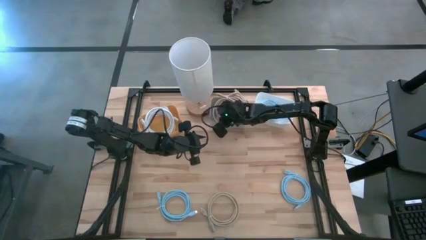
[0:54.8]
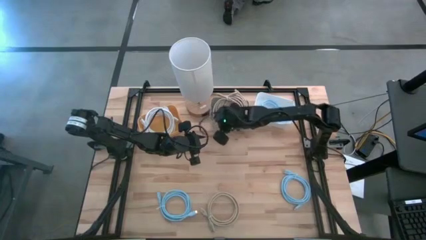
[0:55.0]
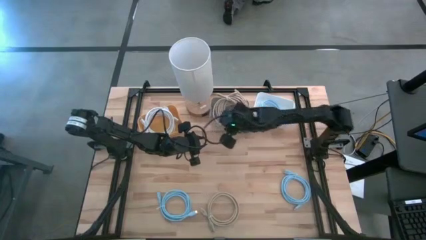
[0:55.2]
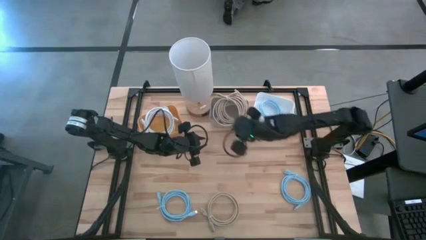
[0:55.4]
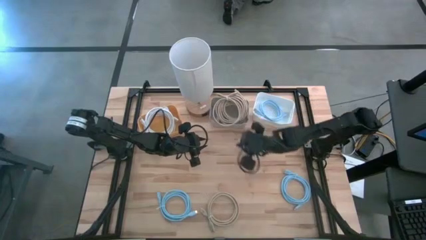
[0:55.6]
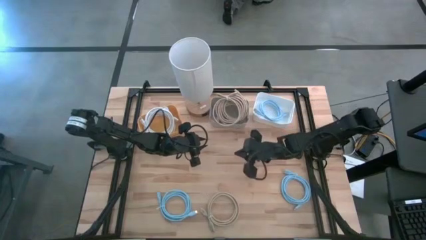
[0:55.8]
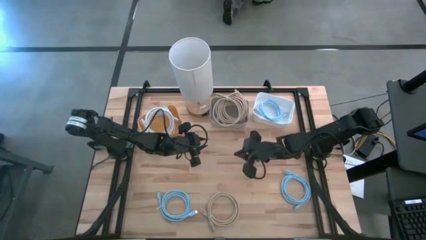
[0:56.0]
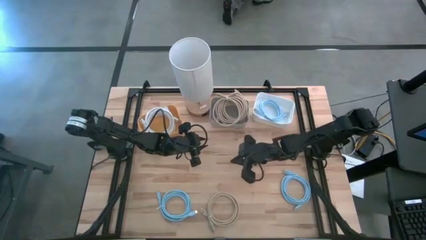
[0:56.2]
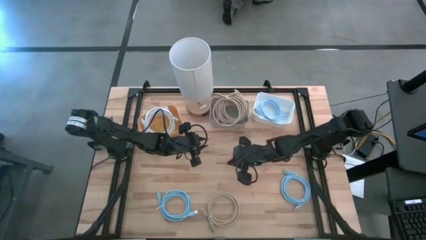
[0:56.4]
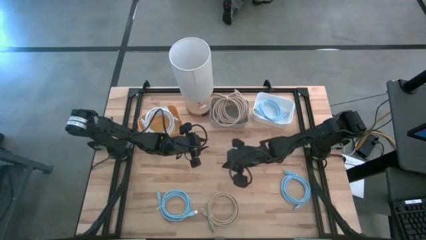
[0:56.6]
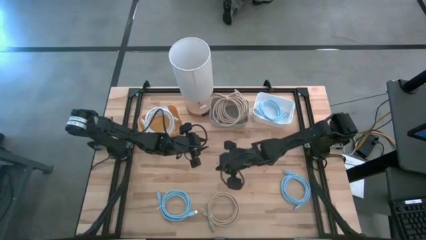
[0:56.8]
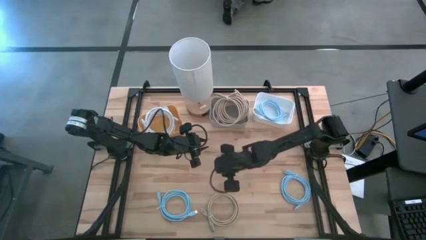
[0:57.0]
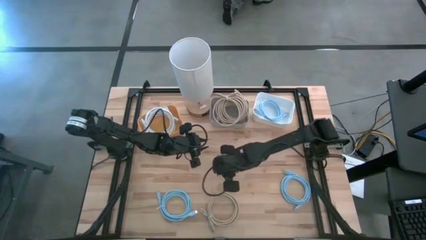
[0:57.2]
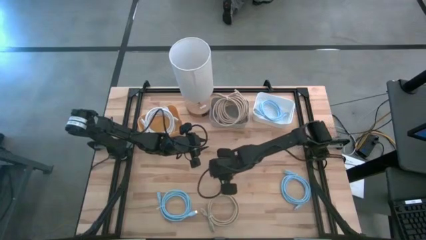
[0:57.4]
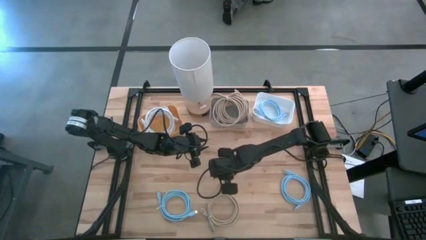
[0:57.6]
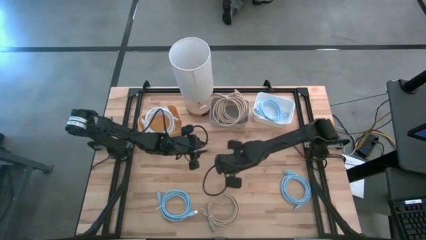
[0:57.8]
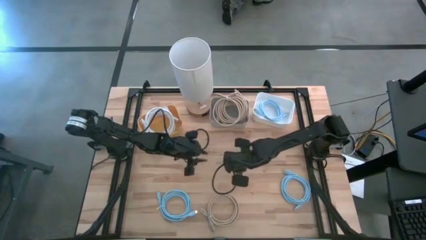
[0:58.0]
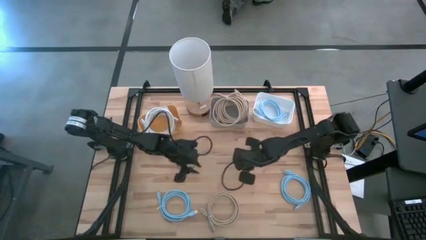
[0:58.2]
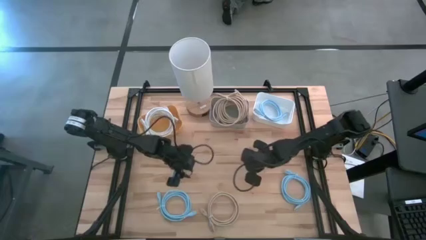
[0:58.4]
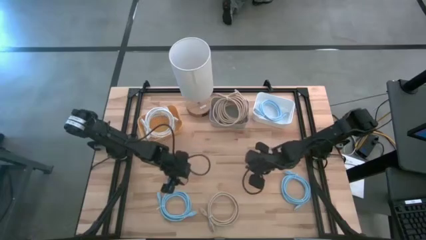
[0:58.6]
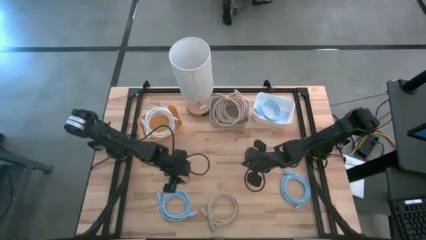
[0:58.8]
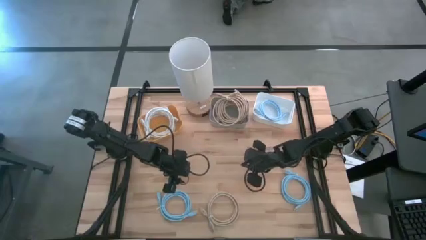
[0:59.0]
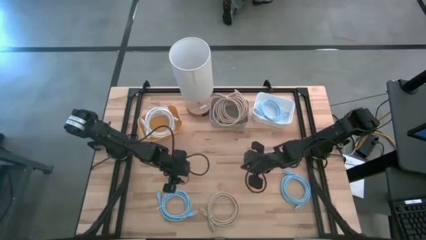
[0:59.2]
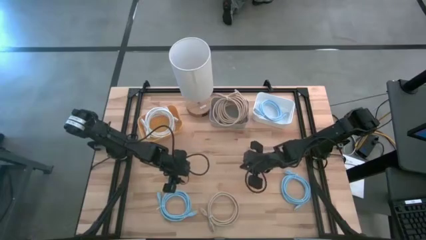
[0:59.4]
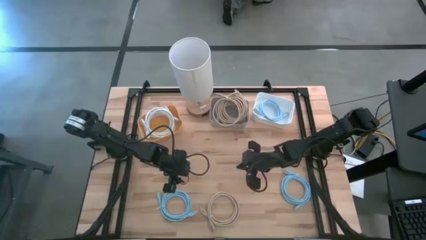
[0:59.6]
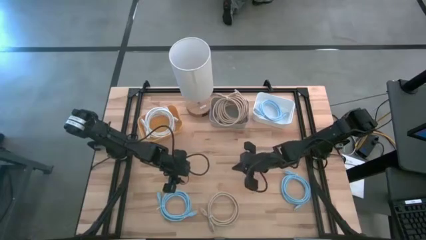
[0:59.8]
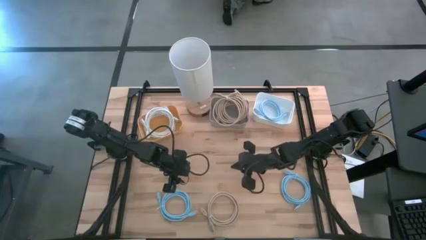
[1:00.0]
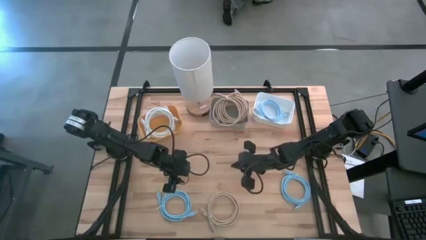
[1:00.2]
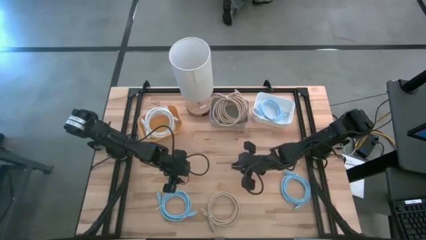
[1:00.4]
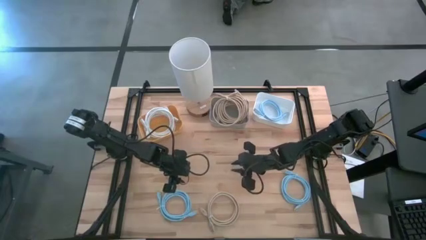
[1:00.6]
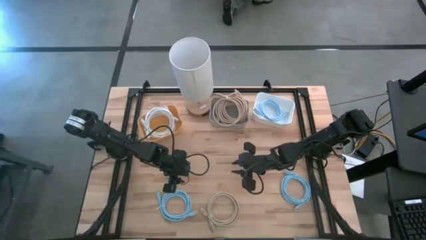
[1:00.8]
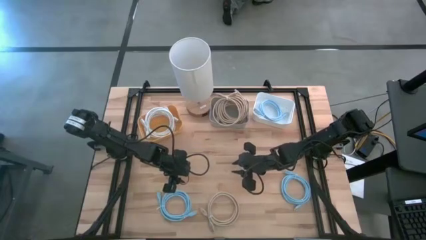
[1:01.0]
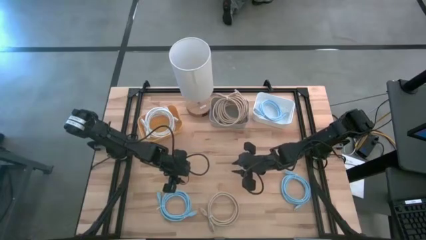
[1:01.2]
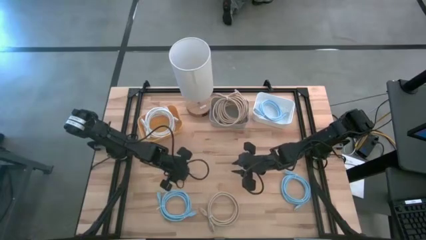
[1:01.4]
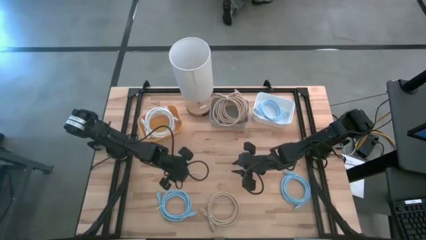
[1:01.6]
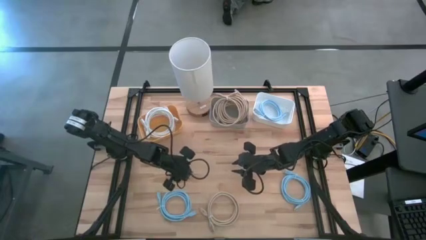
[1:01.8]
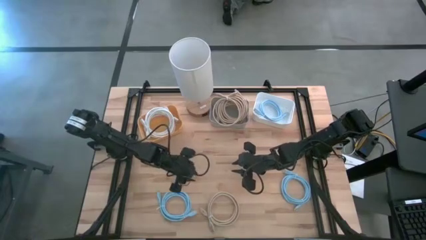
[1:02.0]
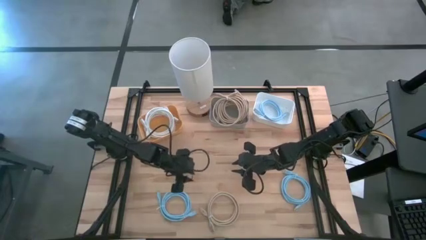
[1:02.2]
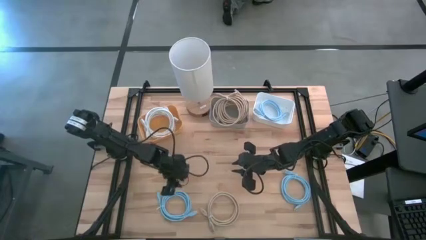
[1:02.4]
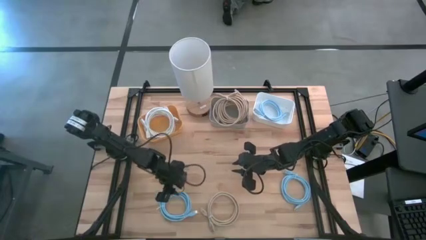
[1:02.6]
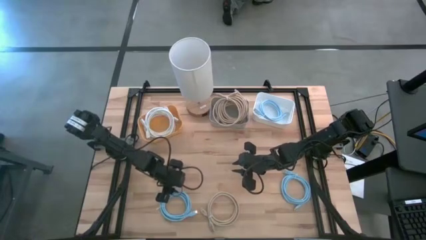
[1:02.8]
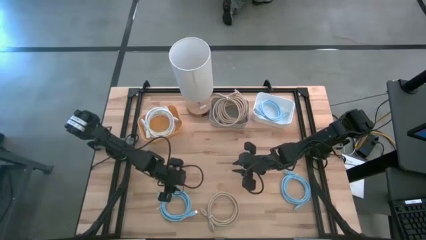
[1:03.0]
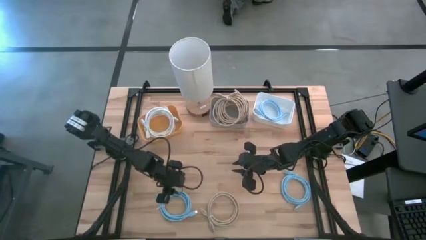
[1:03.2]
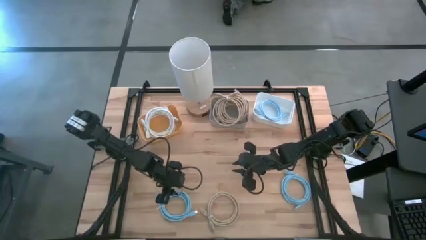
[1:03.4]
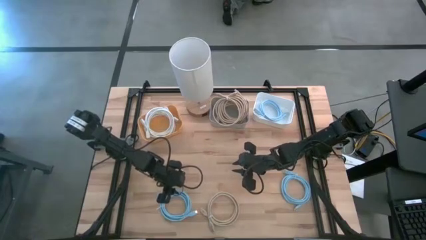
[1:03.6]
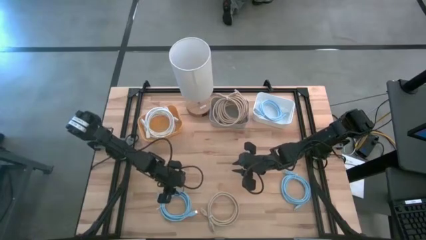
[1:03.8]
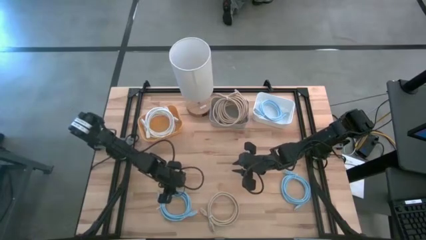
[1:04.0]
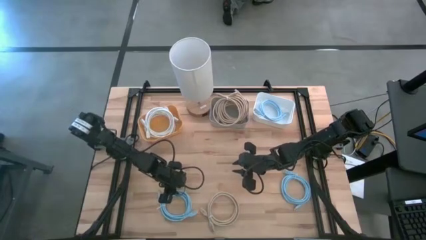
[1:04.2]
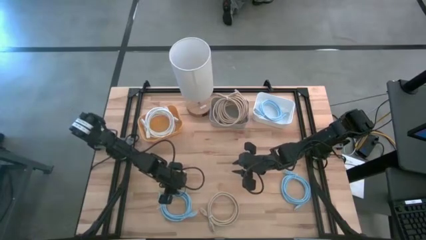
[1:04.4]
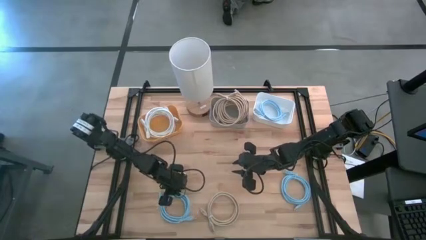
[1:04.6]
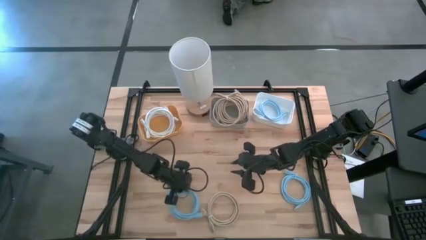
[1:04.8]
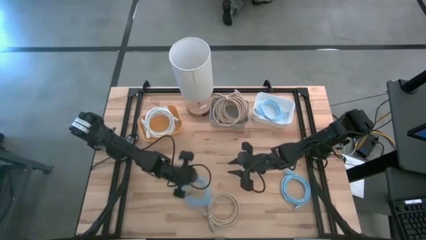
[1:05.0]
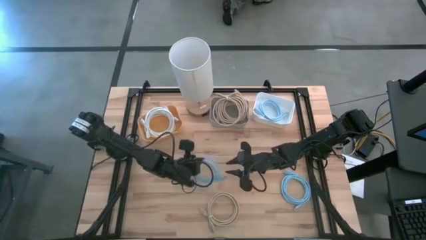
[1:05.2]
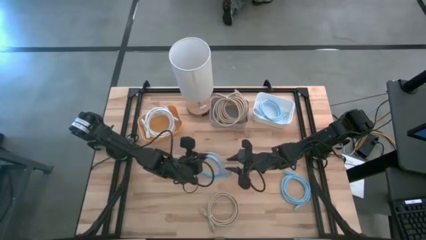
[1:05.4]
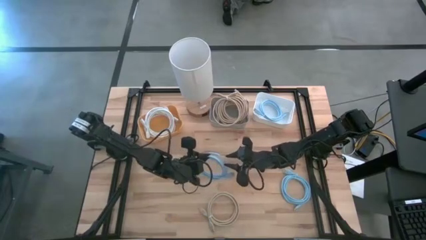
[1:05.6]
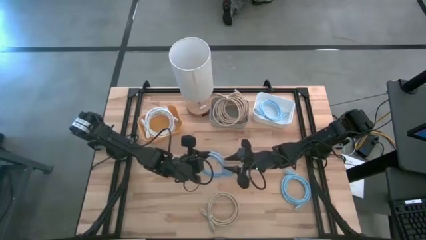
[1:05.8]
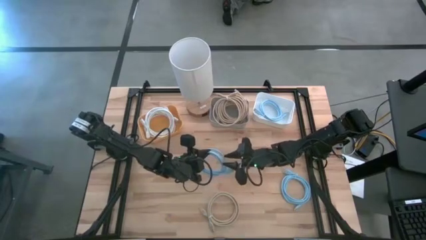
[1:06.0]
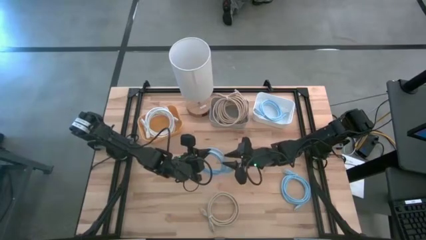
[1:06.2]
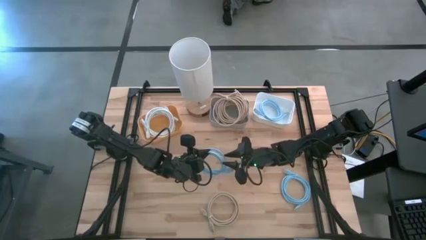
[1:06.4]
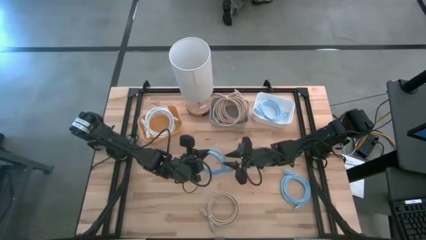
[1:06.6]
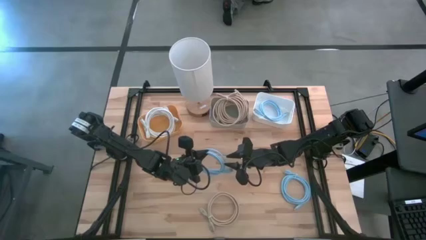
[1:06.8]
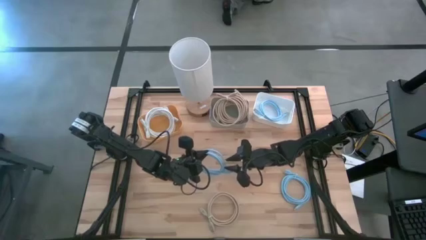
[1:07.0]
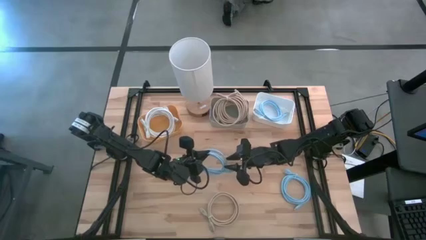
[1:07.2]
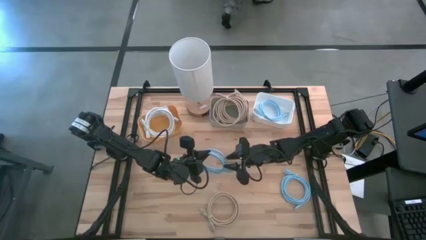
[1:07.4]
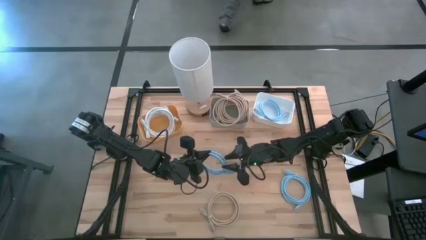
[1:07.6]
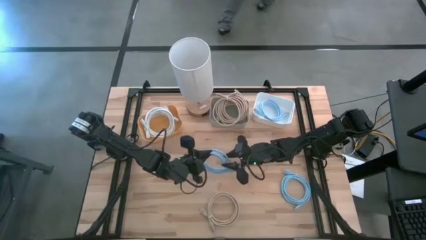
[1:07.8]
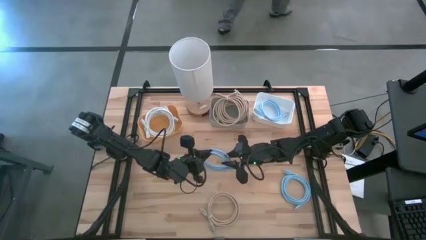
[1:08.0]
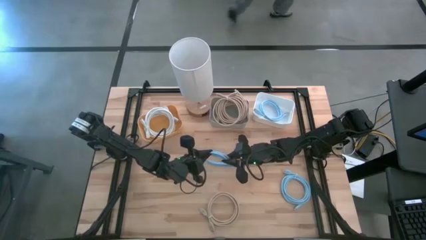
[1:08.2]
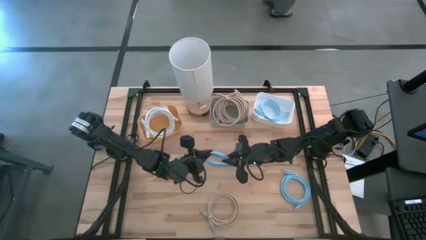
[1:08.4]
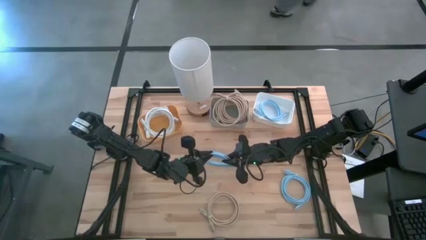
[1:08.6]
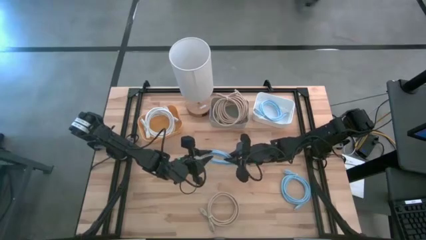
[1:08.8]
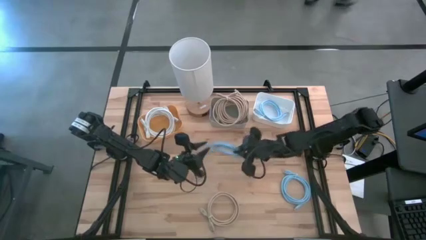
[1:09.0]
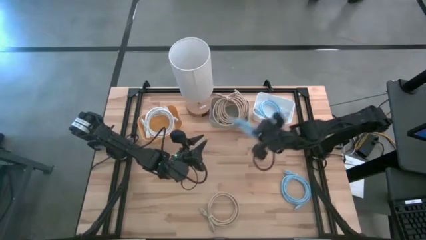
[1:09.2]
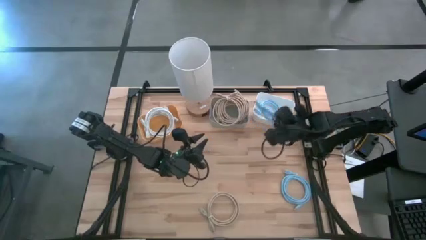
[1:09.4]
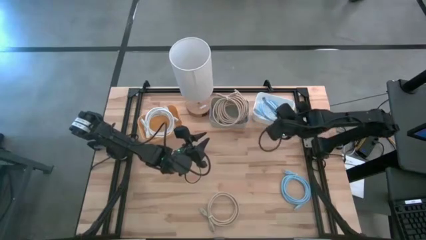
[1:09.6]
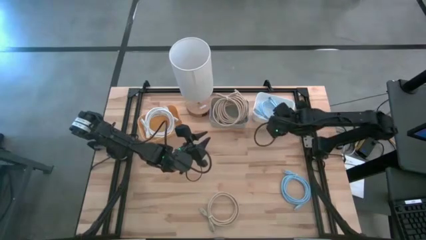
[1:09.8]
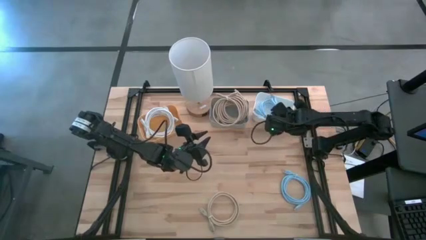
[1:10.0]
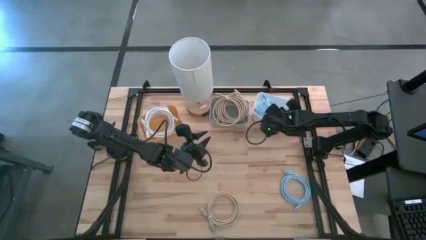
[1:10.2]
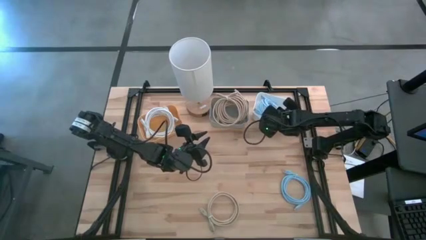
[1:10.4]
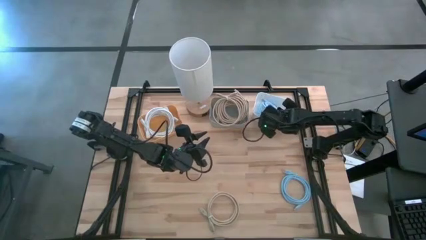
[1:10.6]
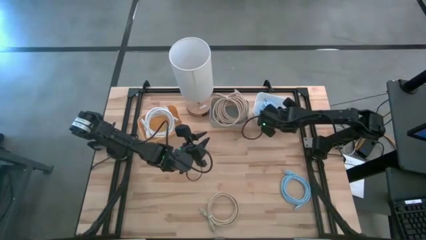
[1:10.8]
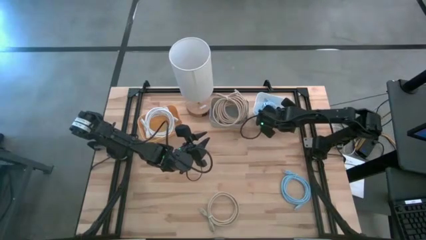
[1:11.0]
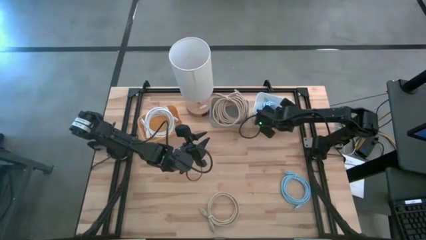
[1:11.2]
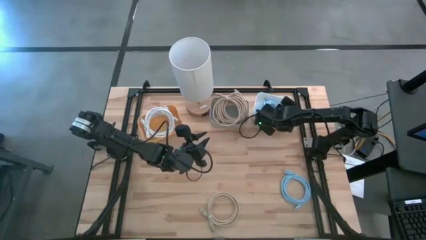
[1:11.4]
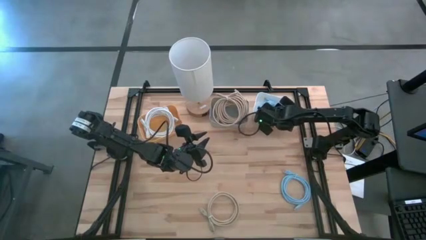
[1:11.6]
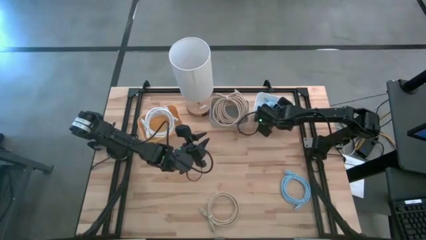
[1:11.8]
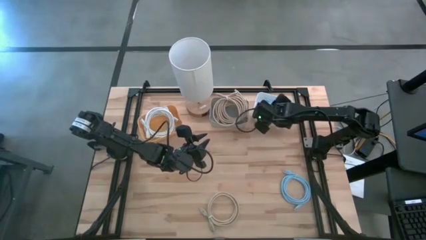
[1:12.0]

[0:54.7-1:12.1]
Task: Sort HDMI cables
Put the left blue HDMI cable into the white bin
